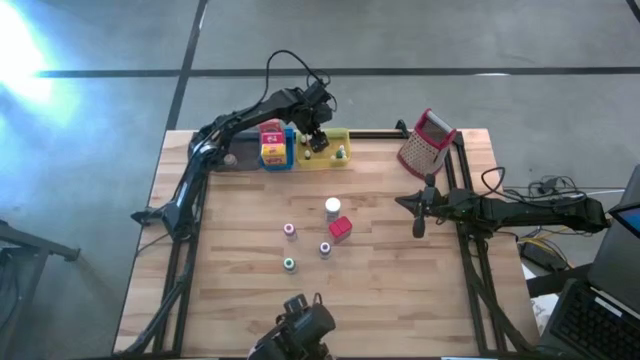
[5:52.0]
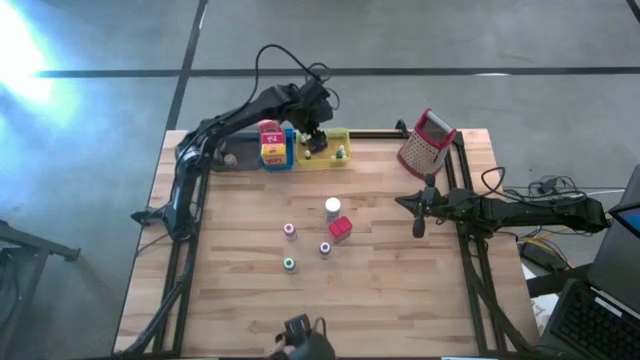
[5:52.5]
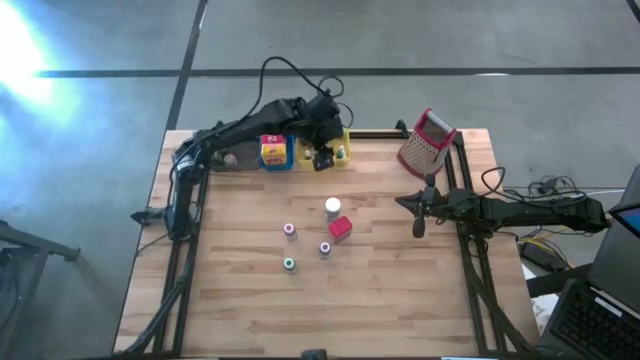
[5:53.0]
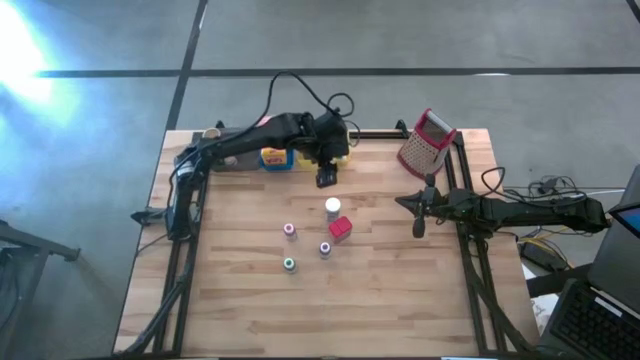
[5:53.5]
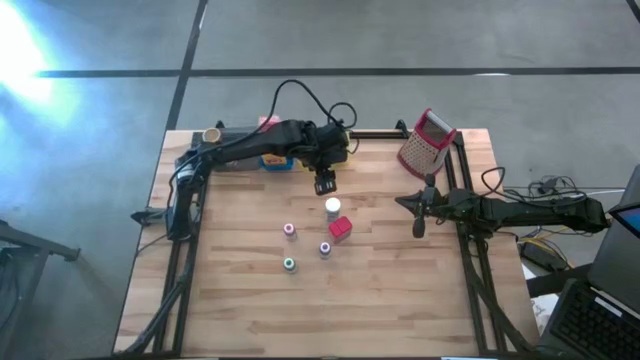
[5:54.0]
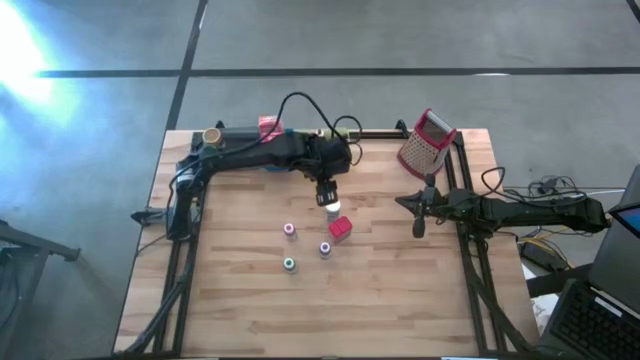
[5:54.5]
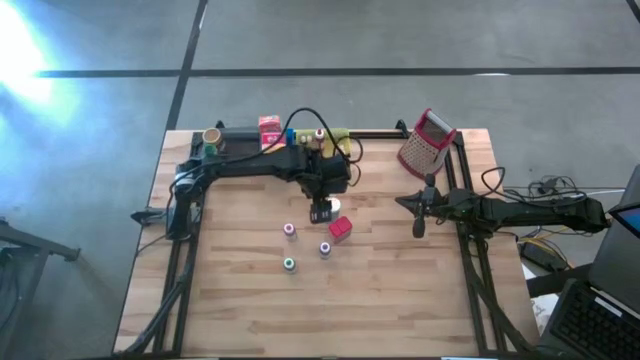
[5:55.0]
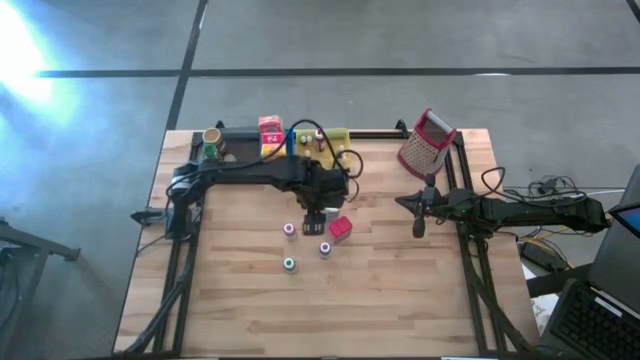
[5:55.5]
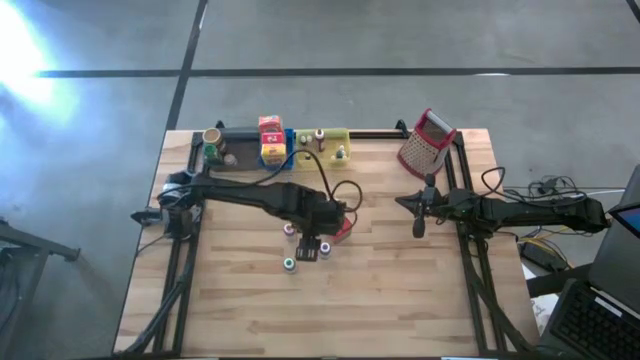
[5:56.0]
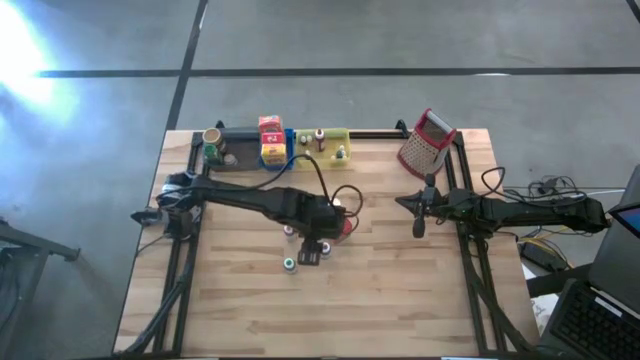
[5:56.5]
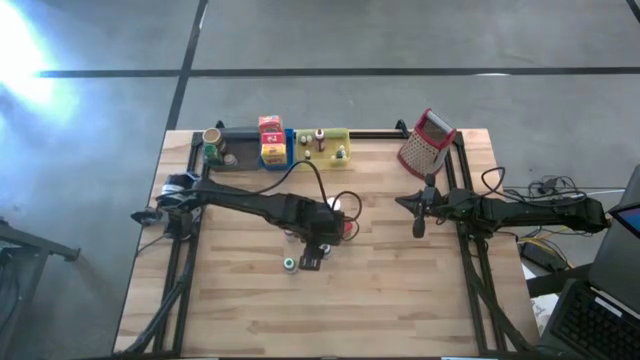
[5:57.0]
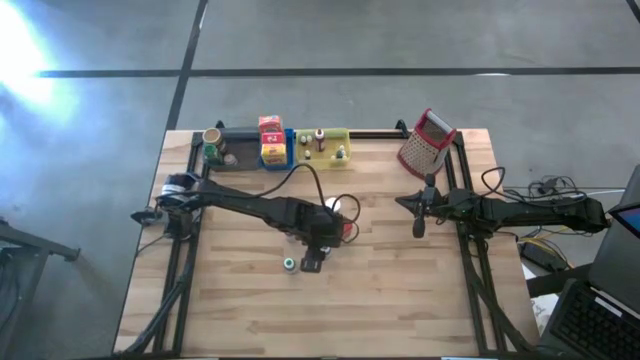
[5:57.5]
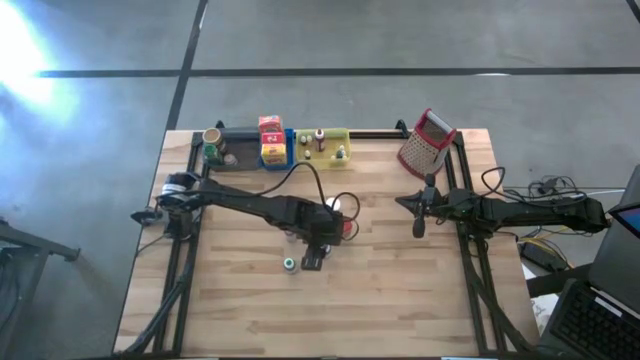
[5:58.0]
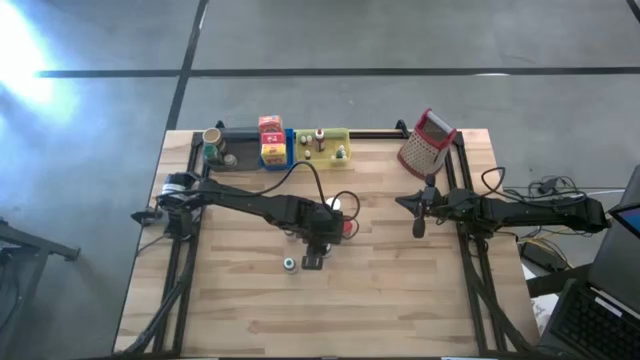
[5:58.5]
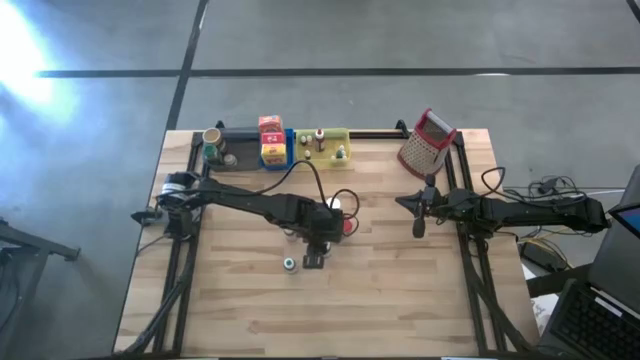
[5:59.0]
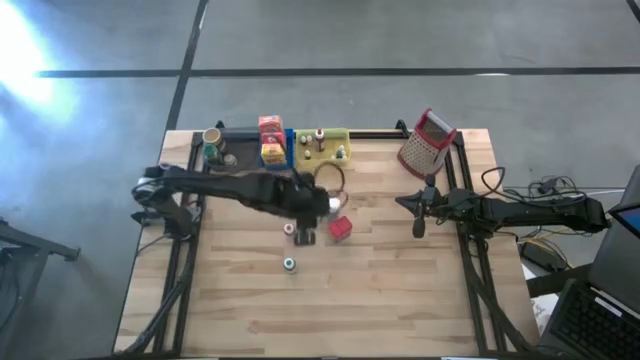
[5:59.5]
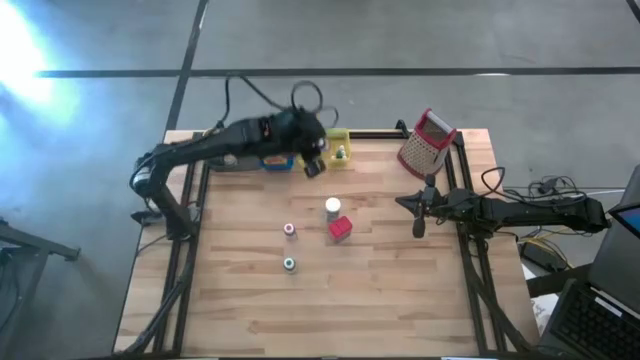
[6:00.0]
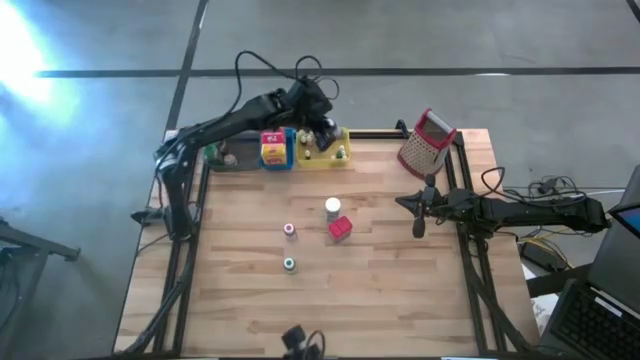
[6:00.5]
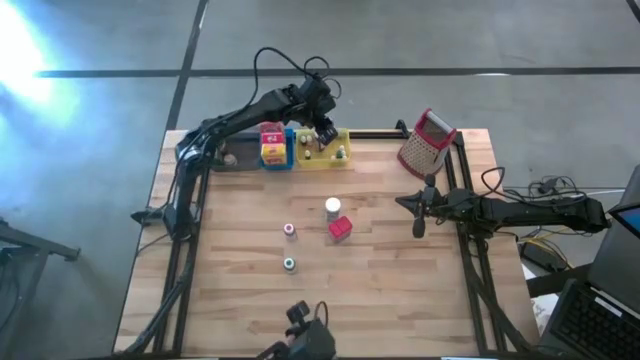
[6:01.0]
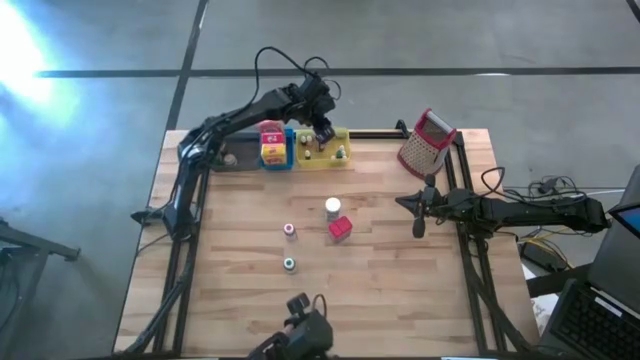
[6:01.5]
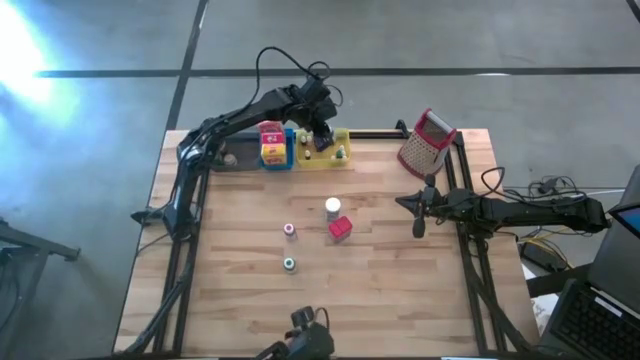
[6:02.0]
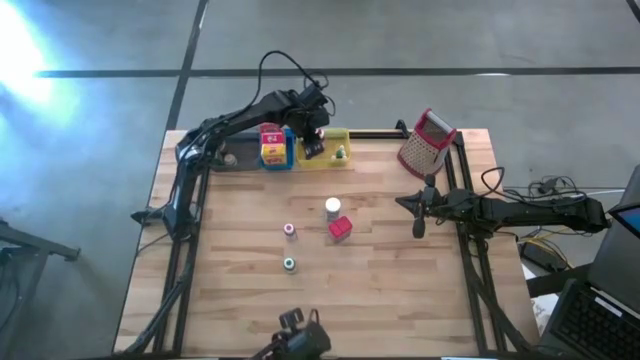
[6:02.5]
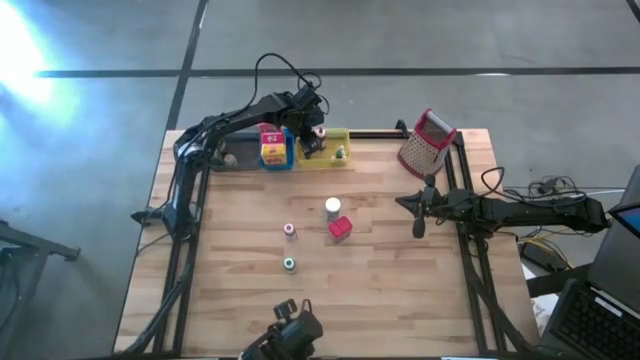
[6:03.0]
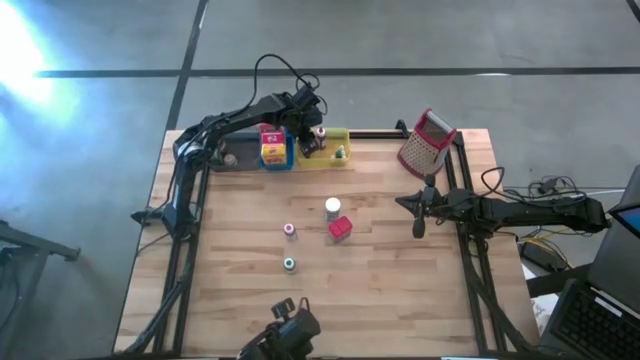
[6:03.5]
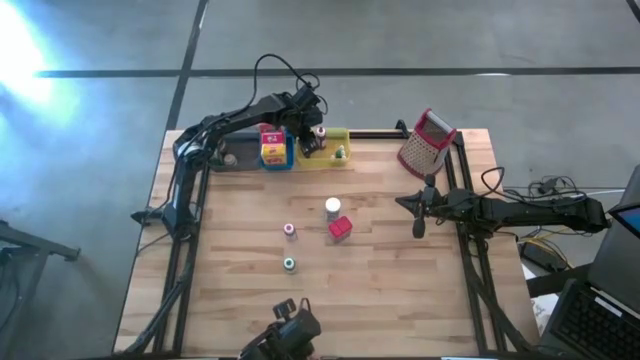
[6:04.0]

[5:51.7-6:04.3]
Task: Pick & Place Kitchen Items
Put the large violet food coloring bottle into the yellow bin

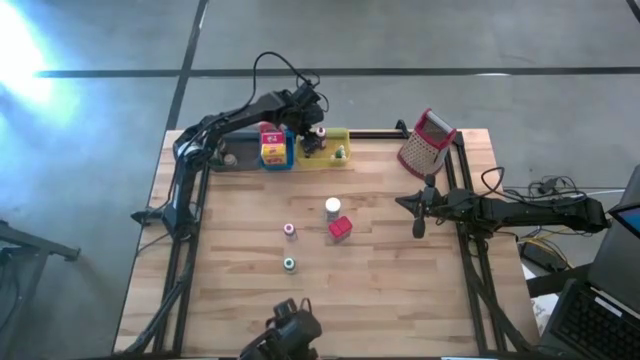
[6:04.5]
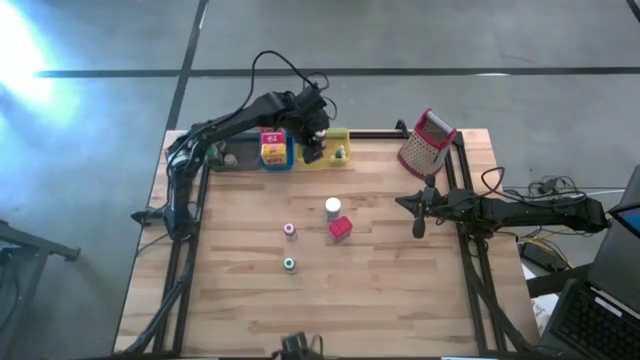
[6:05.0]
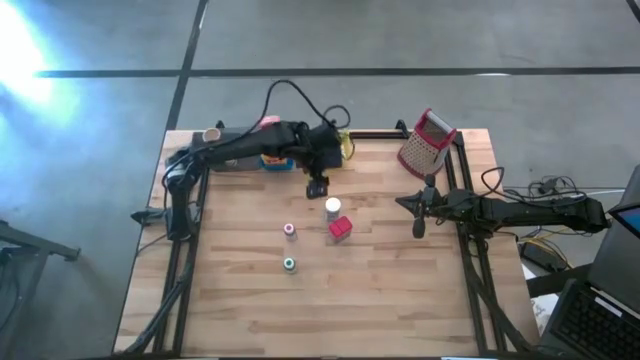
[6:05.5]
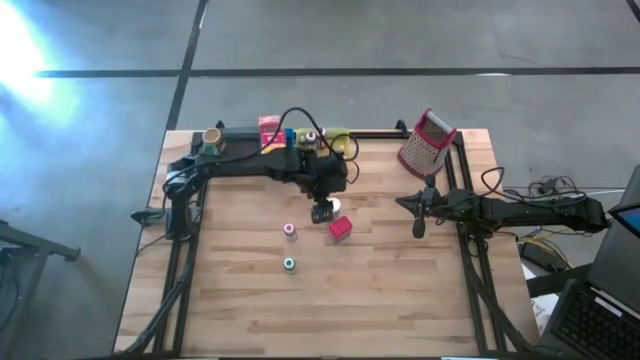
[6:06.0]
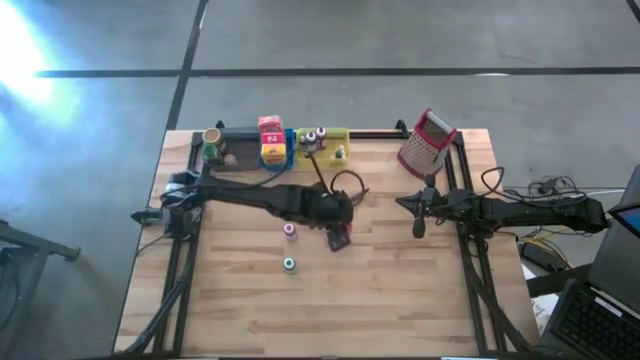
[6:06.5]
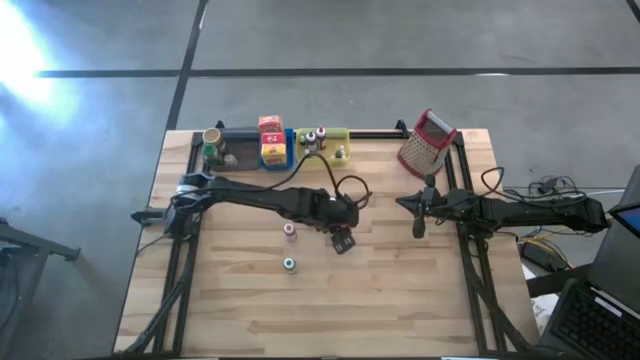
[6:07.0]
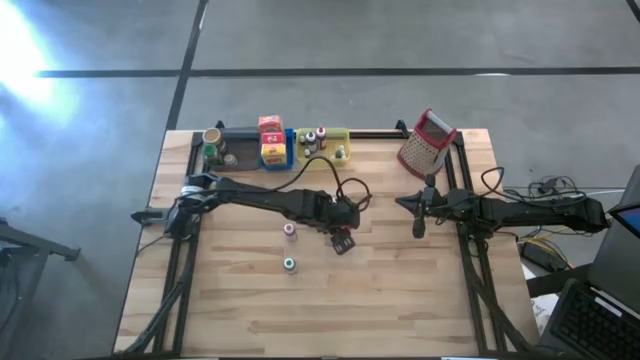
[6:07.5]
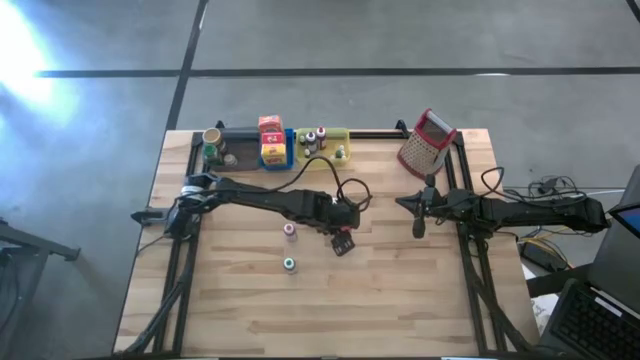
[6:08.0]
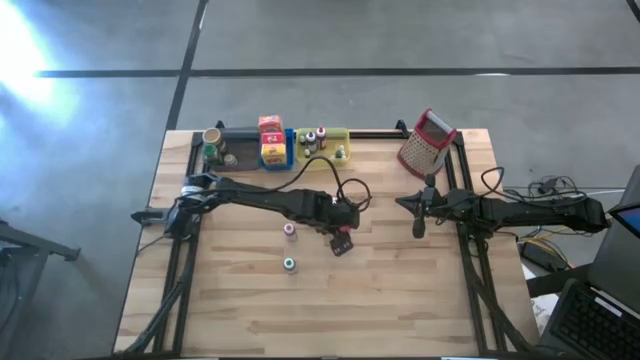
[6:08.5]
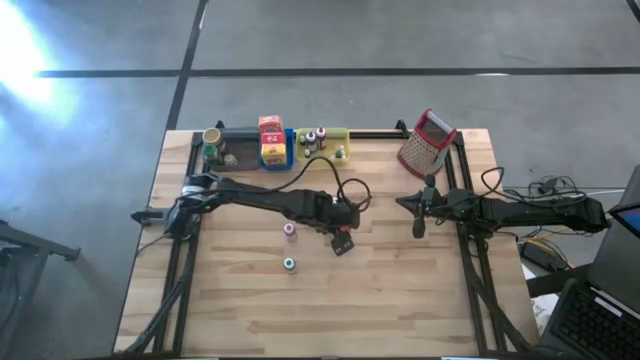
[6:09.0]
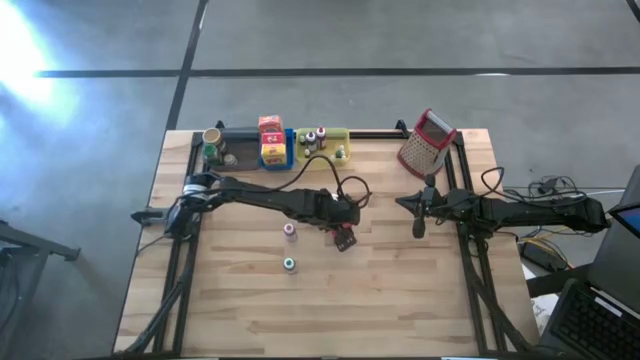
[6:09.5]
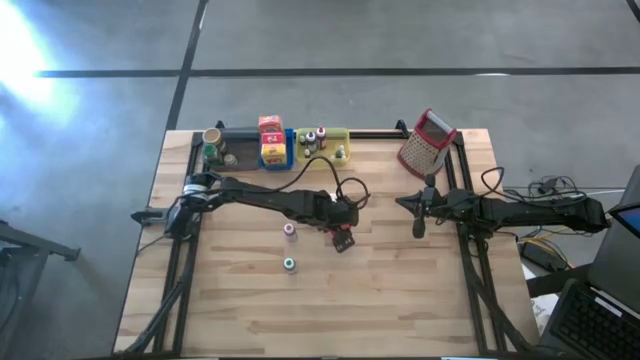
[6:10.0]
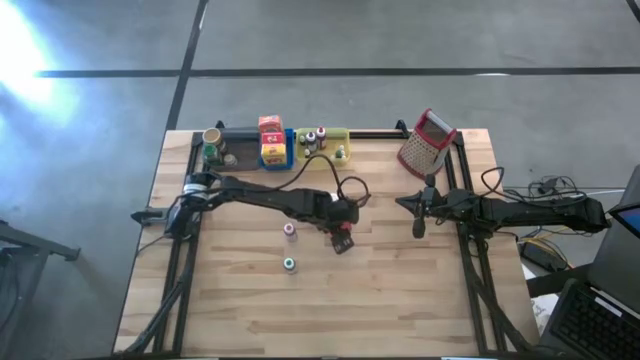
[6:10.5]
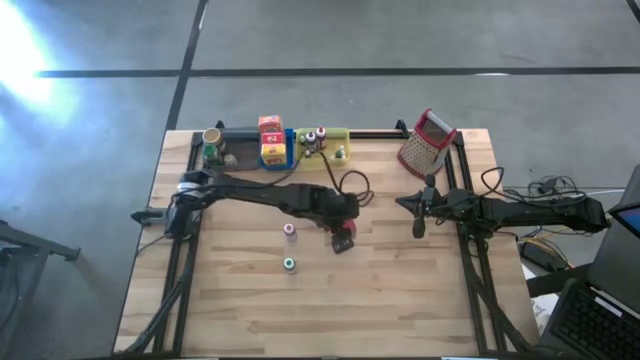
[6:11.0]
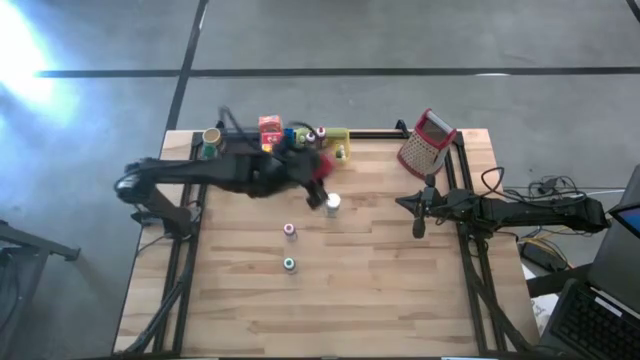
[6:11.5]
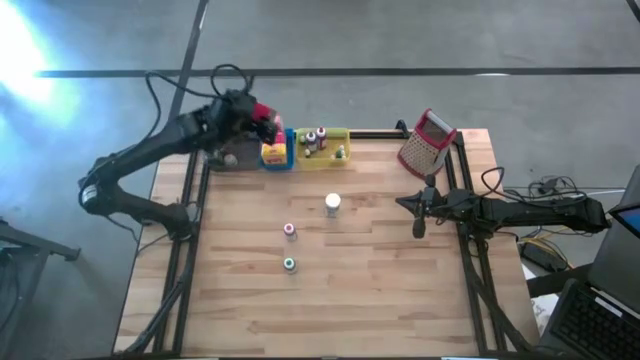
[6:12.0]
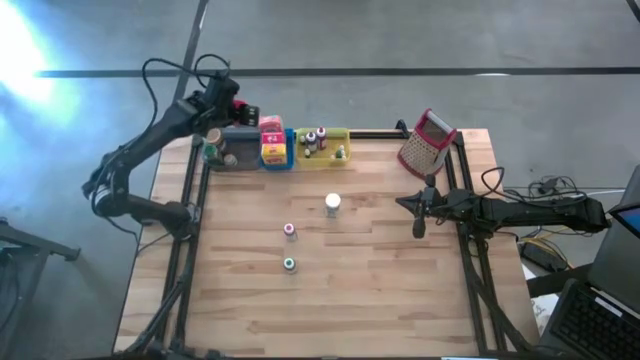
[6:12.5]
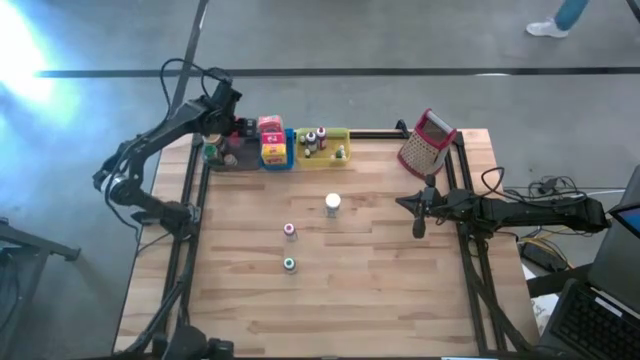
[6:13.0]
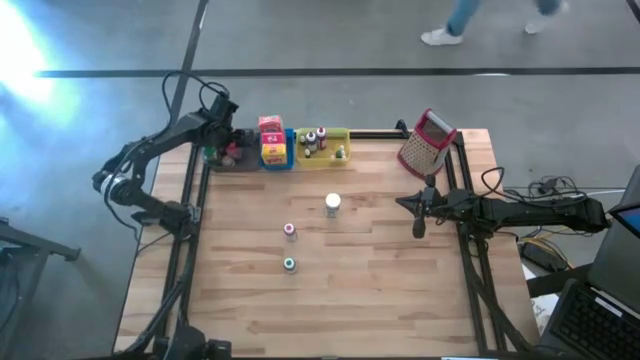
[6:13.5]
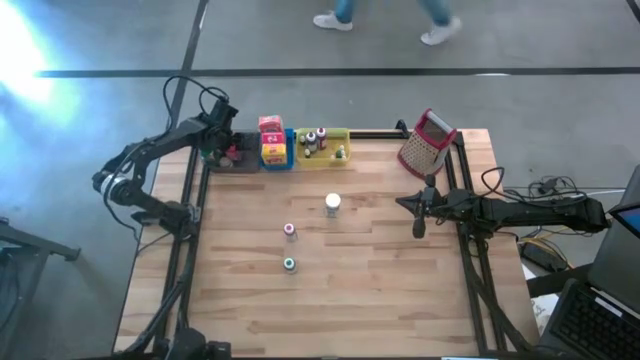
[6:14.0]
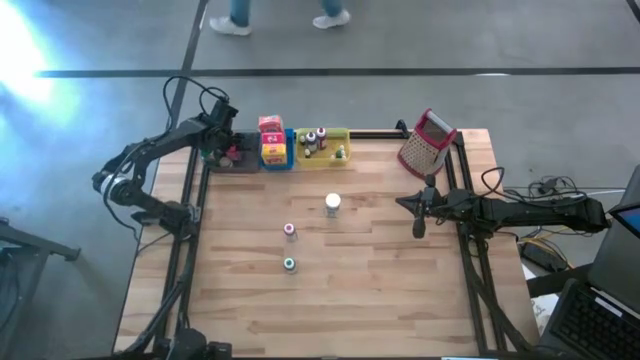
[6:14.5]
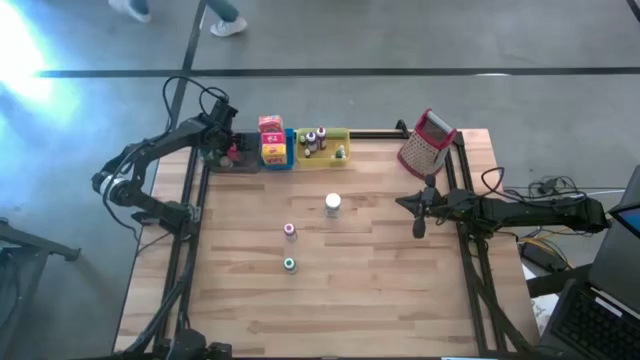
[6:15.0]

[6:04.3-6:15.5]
Put the red seasoning bottle into the black bin
